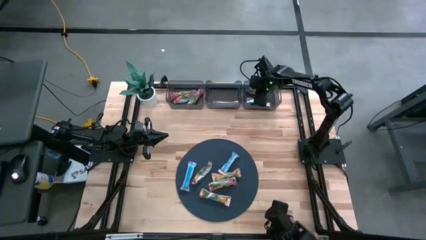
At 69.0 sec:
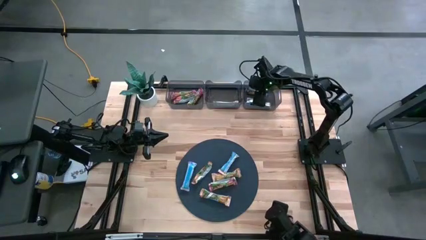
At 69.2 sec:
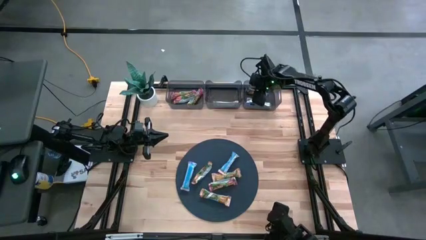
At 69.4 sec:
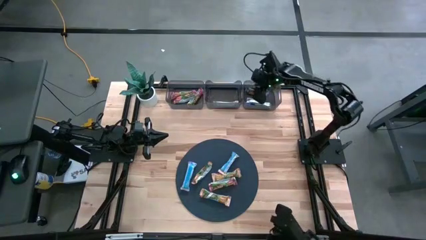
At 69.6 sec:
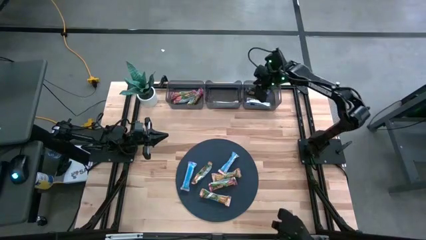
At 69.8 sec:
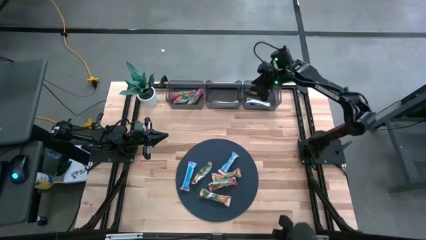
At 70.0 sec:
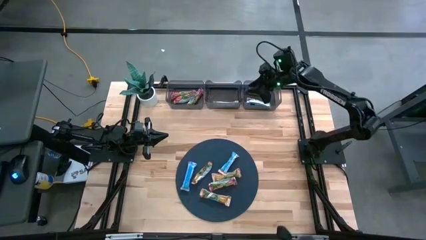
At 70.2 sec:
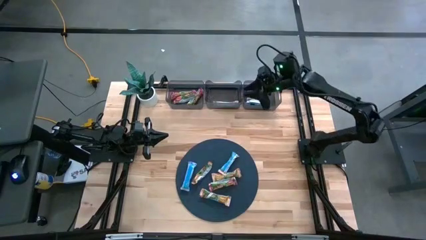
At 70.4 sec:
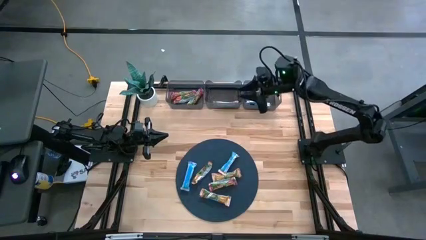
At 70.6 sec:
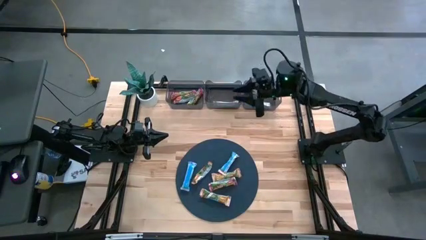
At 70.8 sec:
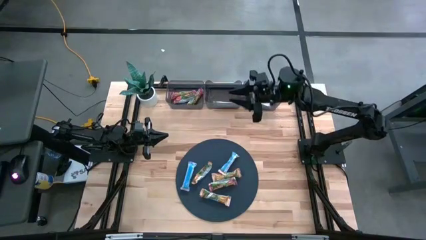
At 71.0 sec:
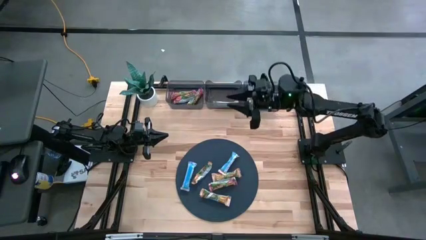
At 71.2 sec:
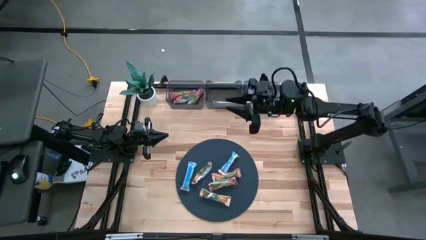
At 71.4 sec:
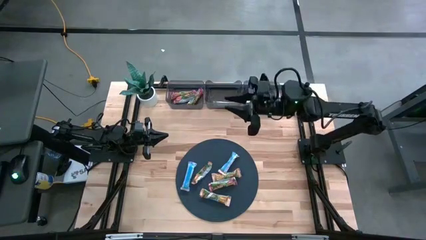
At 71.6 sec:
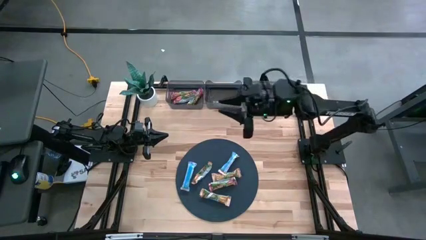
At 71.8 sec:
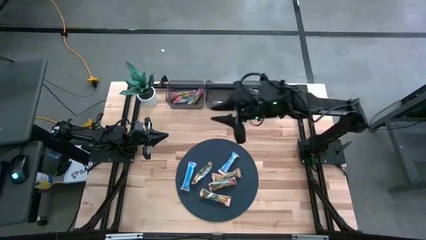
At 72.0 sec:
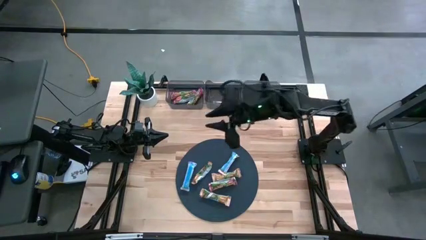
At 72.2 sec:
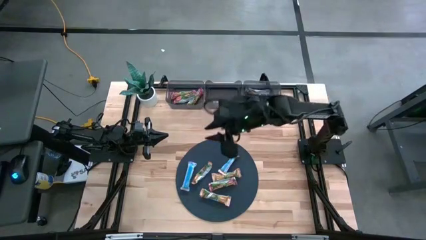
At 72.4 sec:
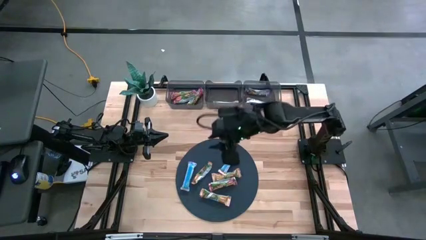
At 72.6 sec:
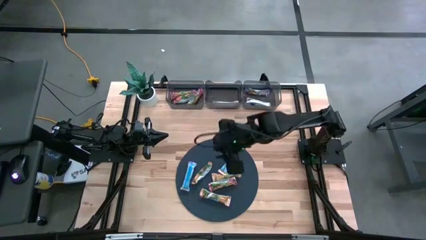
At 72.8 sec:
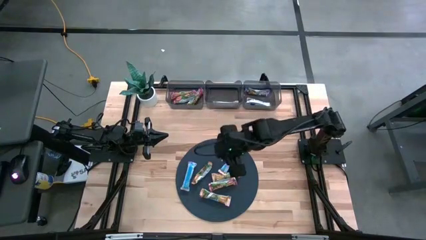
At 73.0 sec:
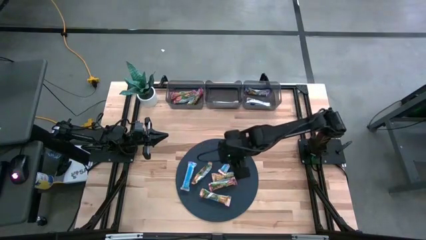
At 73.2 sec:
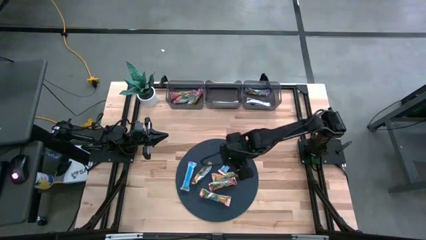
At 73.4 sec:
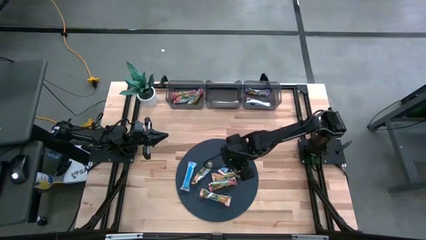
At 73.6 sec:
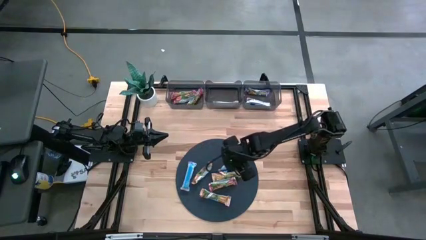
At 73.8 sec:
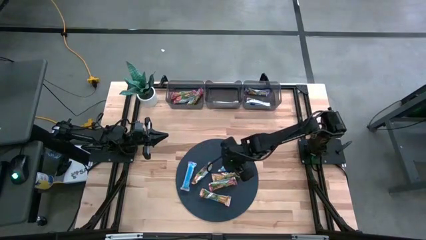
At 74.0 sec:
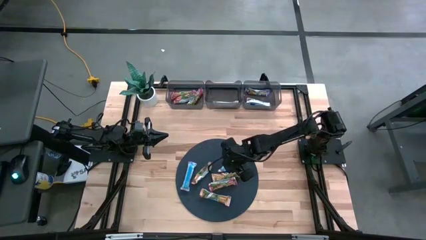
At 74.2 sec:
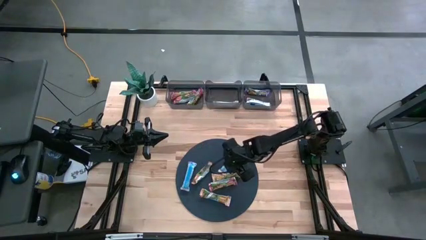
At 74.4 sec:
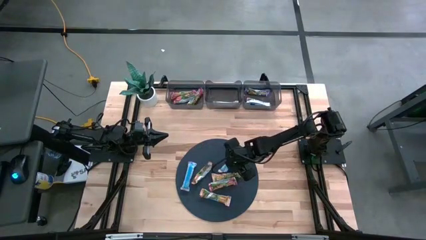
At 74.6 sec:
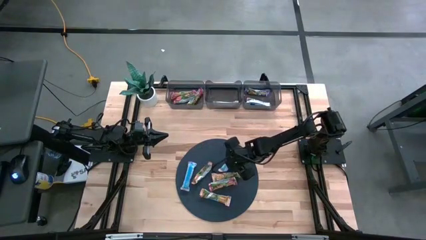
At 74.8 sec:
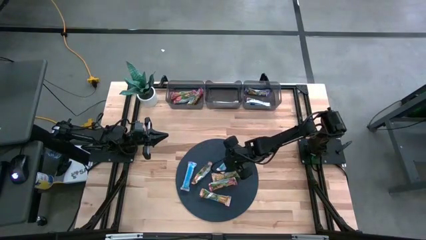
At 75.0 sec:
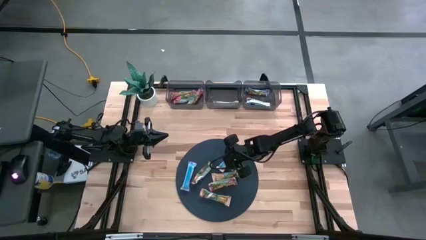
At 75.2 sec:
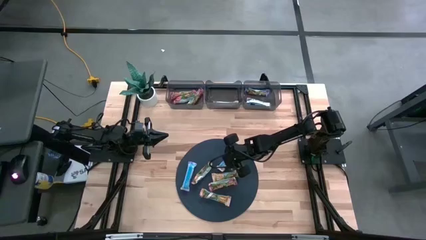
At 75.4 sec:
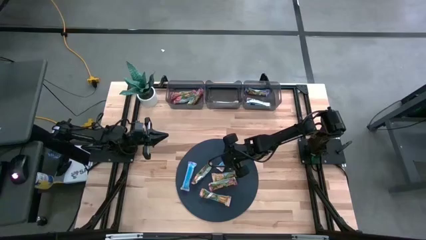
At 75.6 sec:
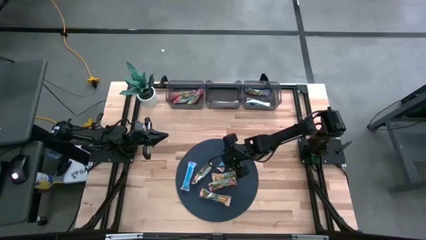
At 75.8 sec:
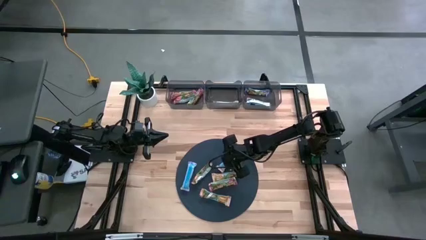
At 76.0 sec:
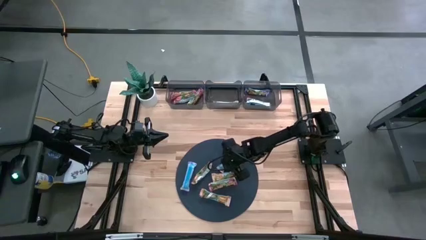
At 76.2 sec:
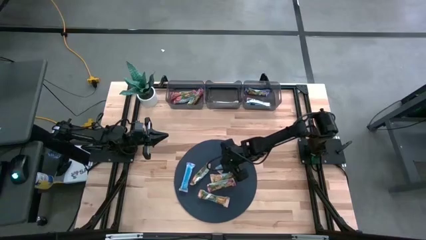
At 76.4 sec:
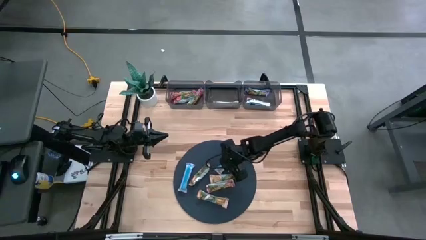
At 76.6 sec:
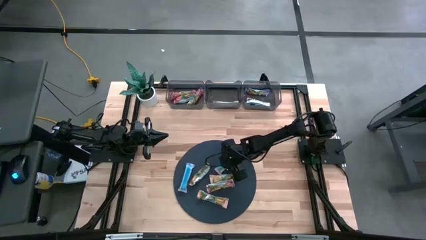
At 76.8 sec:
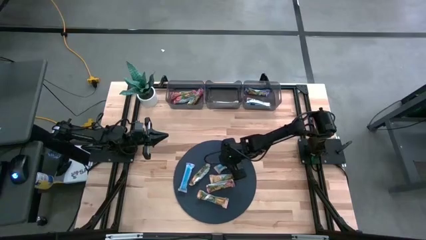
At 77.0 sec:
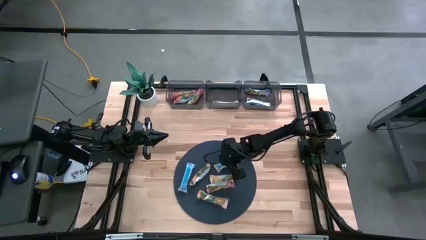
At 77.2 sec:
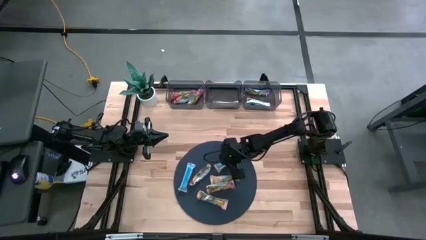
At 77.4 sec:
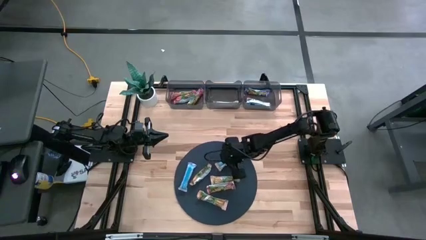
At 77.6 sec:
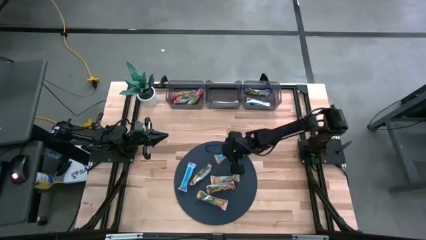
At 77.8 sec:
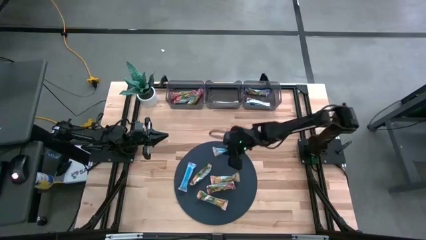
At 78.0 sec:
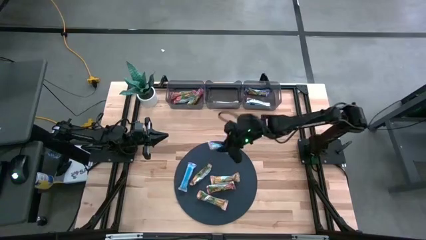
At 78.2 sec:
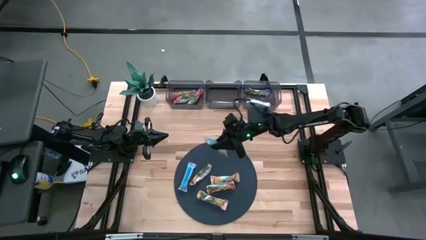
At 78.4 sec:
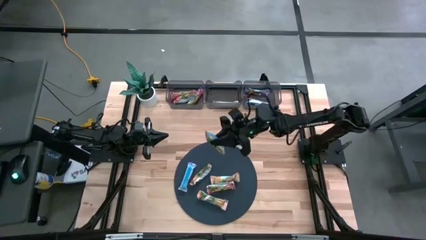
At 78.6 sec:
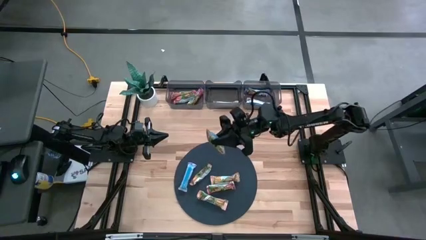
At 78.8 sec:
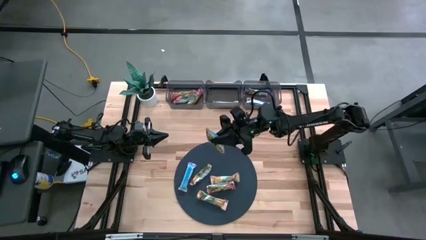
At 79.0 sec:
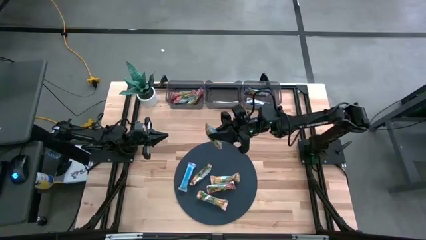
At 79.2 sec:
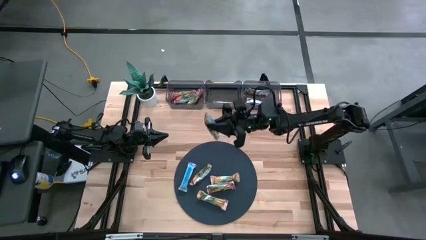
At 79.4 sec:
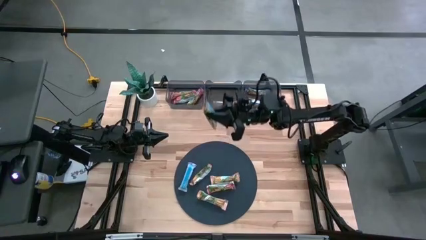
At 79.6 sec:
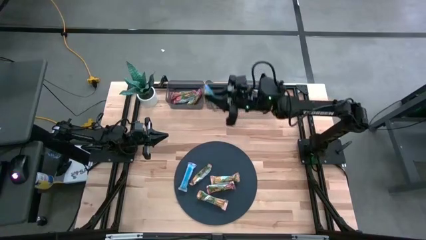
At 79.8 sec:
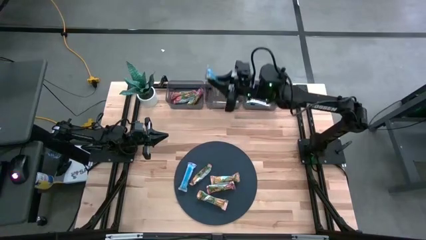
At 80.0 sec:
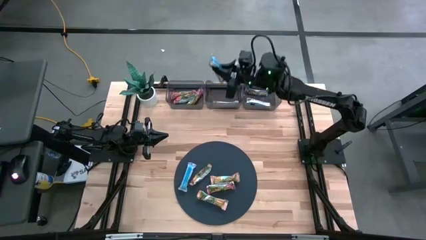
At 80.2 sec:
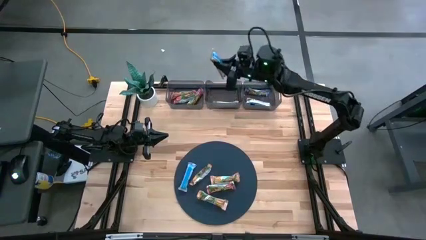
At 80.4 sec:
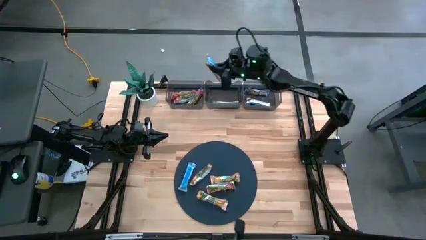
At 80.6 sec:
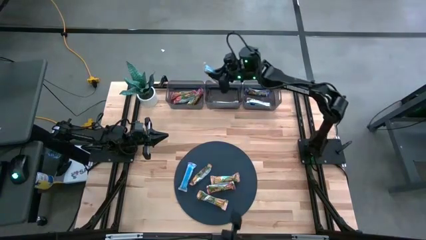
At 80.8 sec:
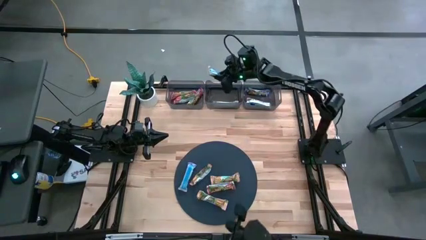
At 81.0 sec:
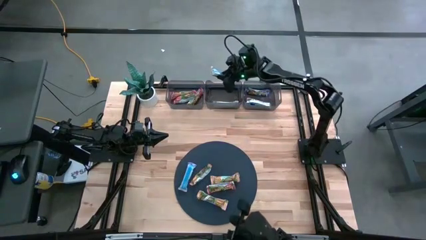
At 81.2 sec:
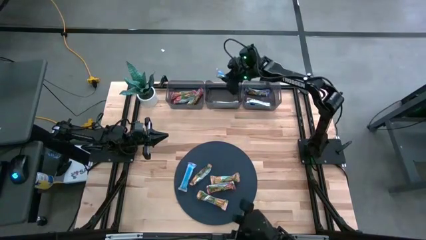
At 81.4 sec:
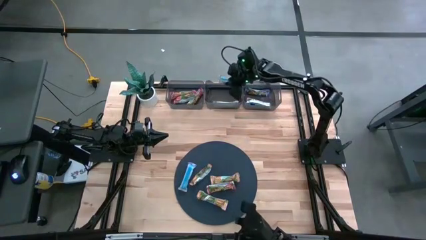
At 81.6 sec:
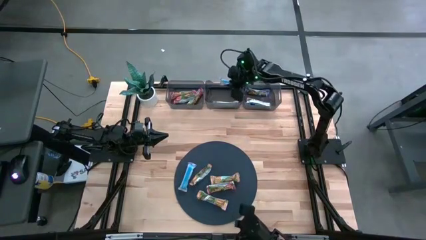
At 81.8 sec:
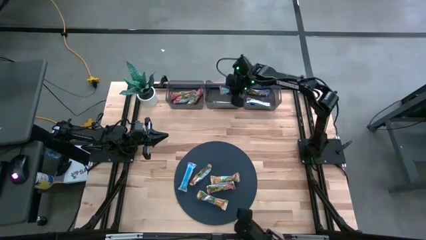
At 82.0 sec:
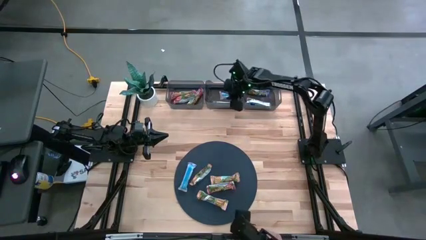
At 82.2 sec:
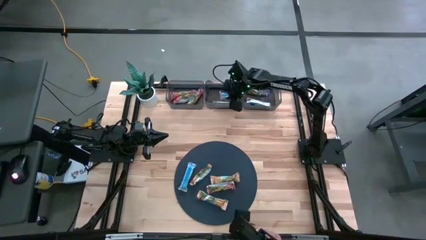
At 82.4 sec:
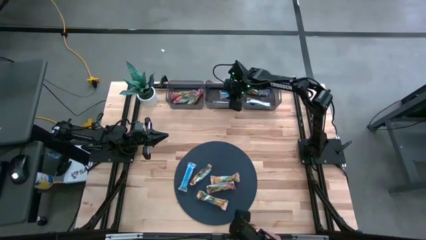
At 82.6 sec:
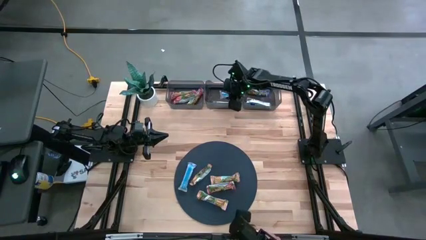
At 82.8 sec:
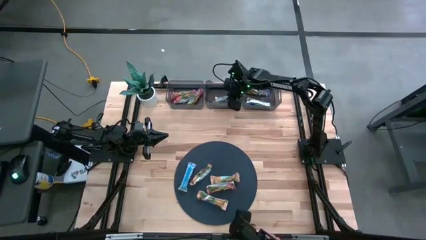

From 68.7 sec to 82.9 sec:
Task: Pick and place Granola Bars by type
Put the yellow granola bar into the middle black bin

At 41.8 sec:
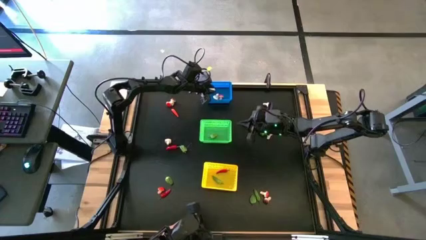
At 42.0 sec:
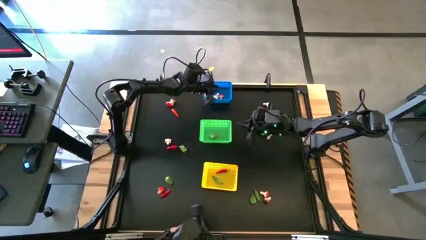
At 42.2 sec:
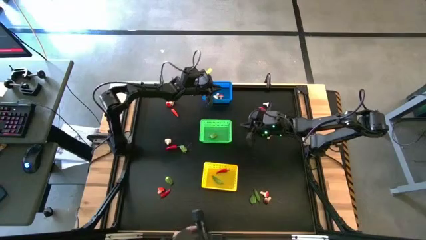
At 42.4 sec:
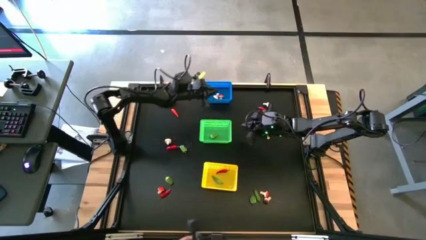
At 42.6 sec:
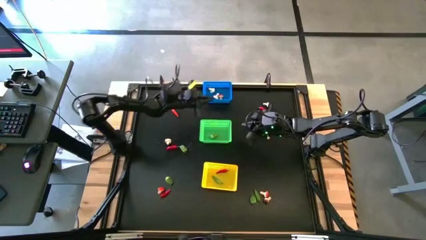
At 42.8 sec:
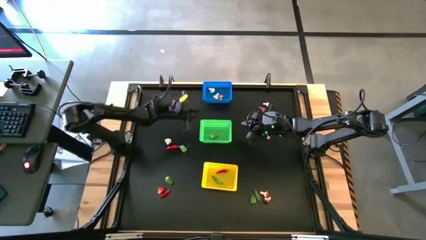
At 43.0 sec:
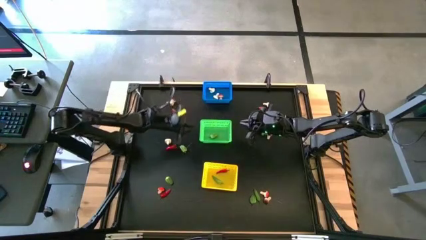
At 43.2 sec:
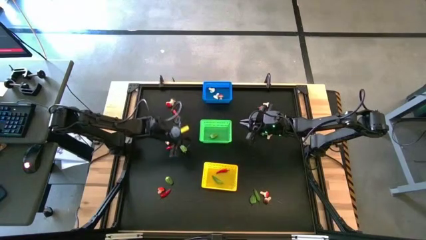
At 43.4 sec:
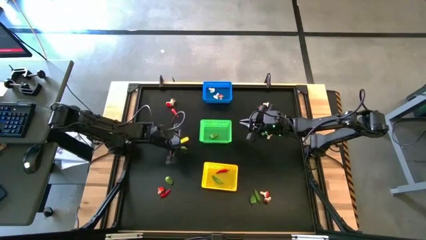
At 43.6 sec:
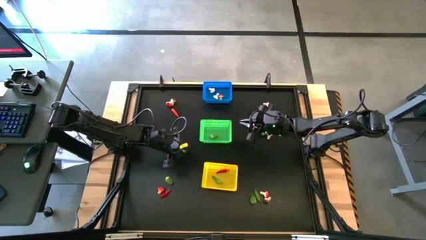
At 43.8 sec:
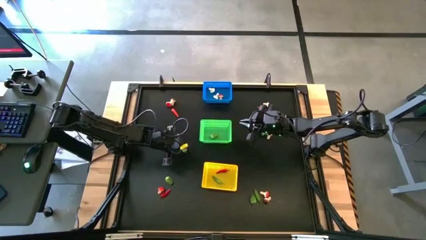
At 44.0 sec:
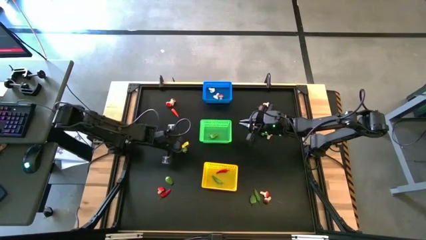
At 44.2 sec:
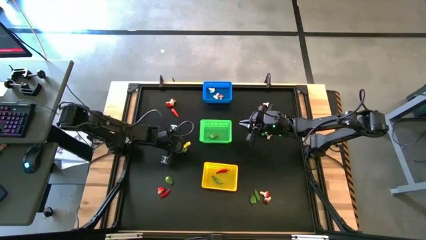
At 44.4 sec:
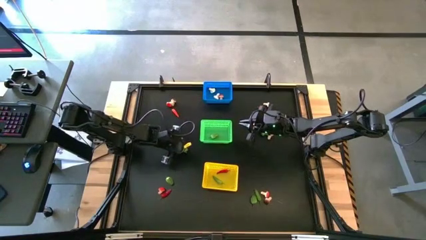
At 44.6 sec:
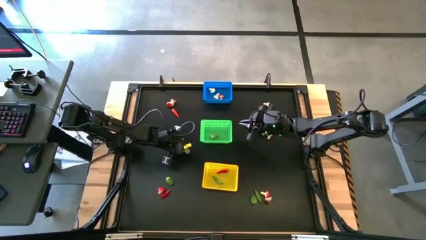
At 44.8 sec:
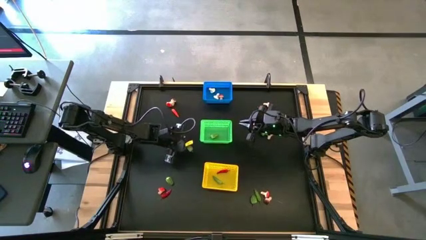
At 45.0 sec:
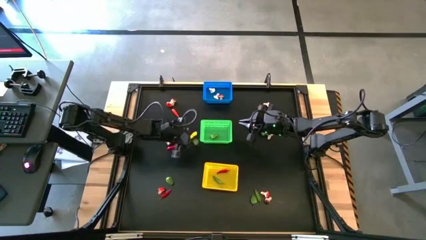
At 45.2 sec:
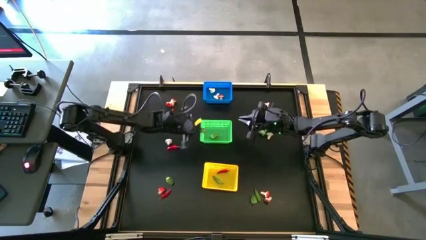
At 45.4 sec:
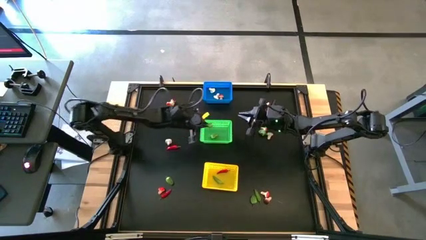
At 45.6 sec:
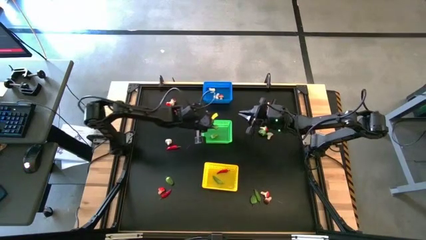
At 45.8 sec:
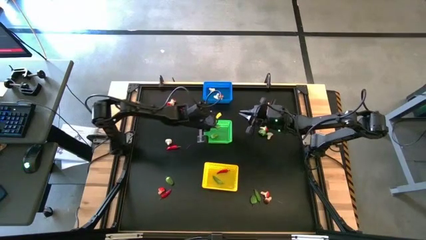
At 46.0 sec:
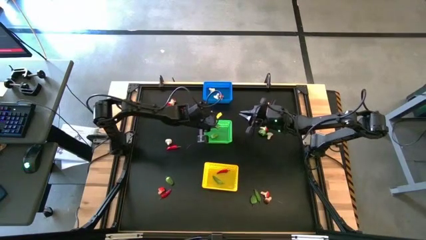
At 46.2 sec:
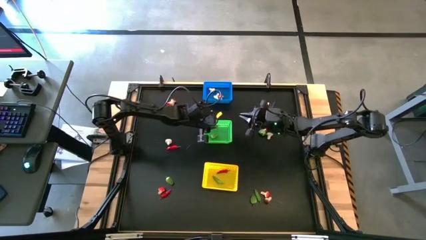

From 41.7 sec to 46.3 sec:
Task: Sort produce into baskets
Put the green chili pepper into the green bin
